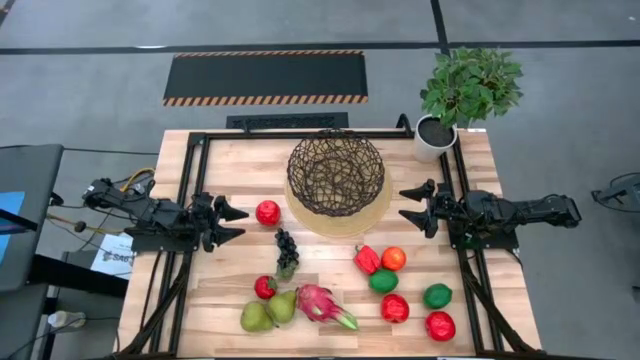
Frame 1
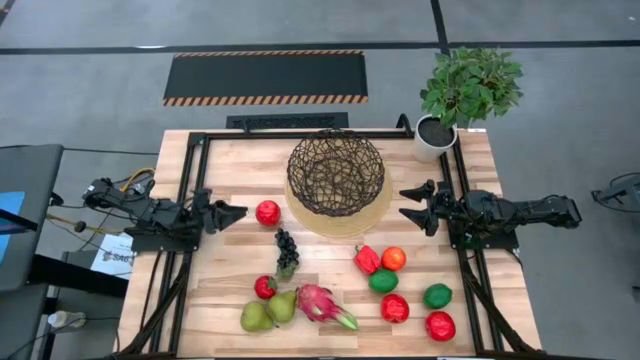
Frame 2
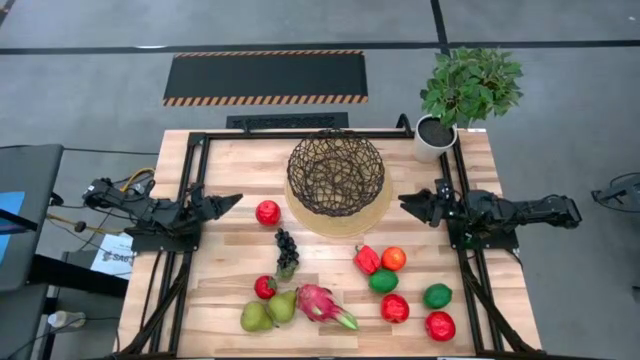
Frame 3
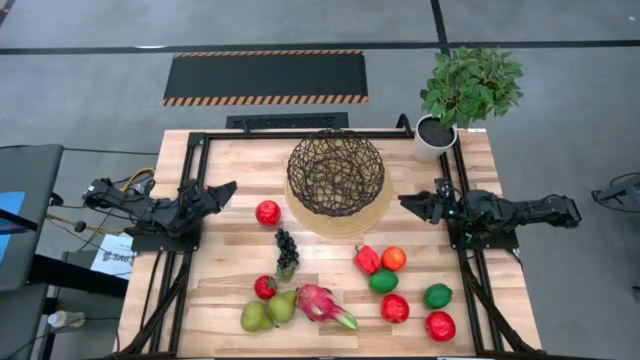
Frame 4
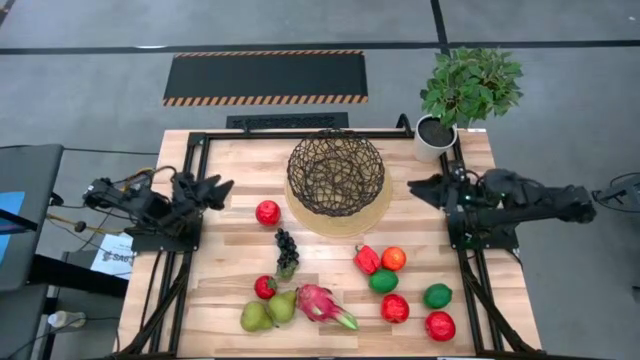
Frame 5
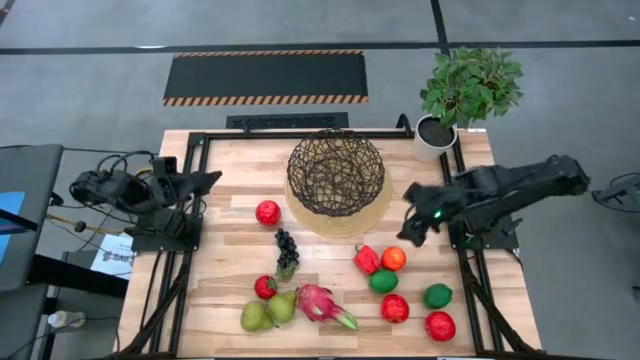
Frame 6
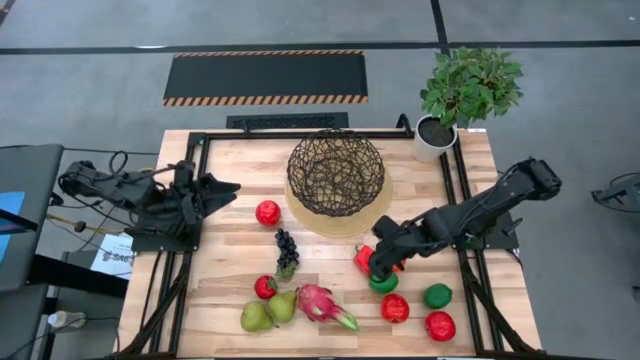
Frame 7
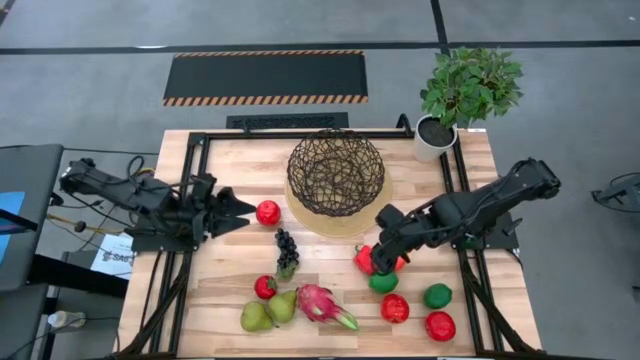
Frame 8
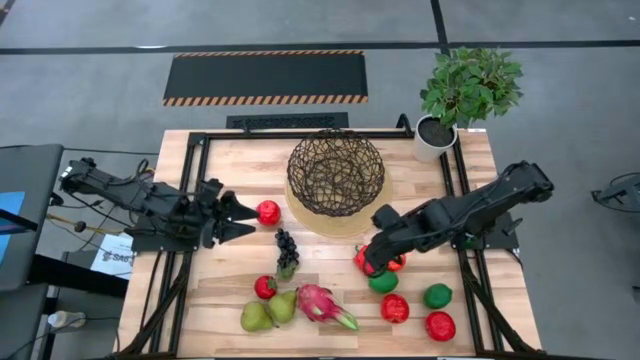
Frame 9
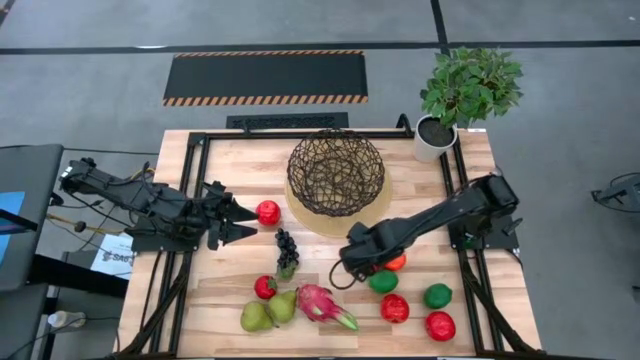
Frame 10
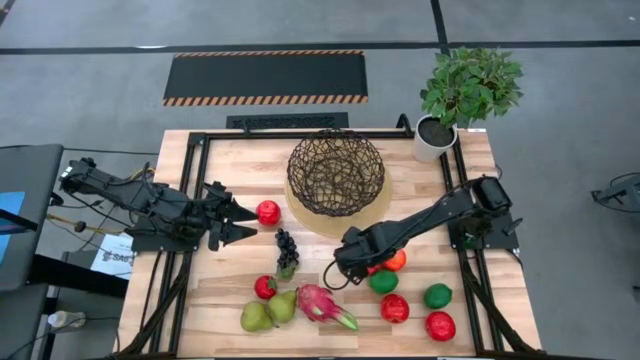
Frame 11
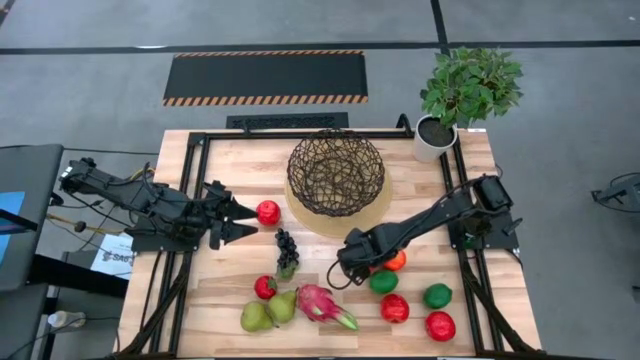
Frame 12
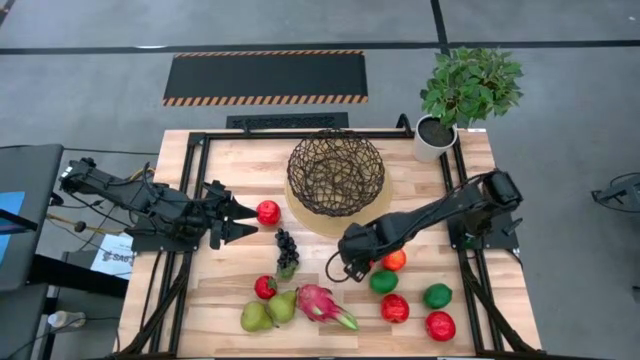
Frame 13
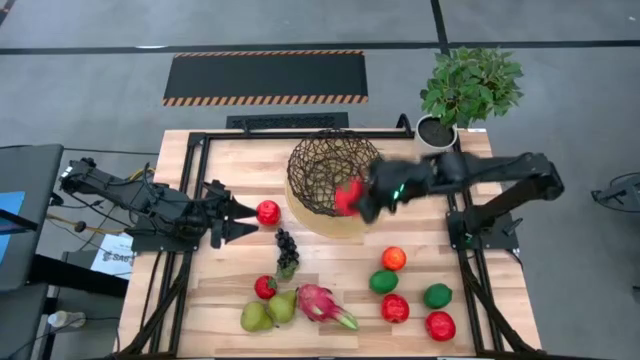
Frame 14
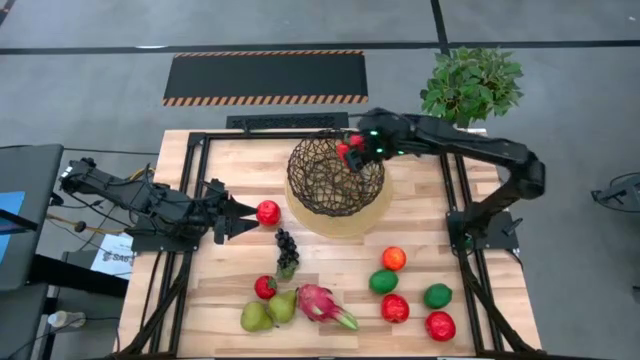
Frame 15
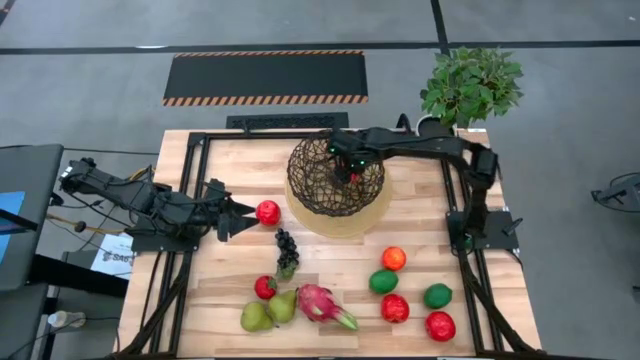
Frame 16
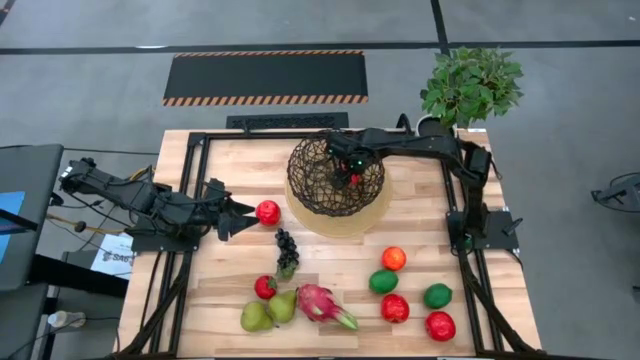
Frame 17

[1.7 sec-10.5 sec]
Task: Build produce basket
Put the red bell pepper into the black wire basket

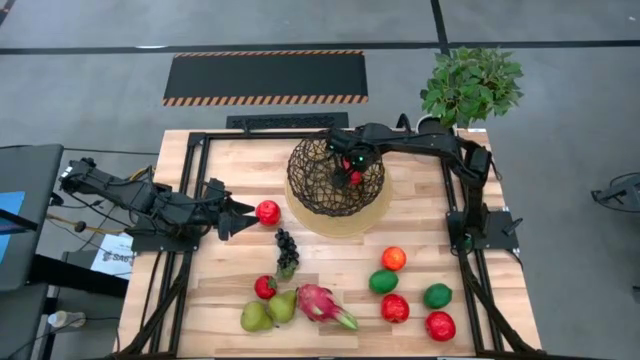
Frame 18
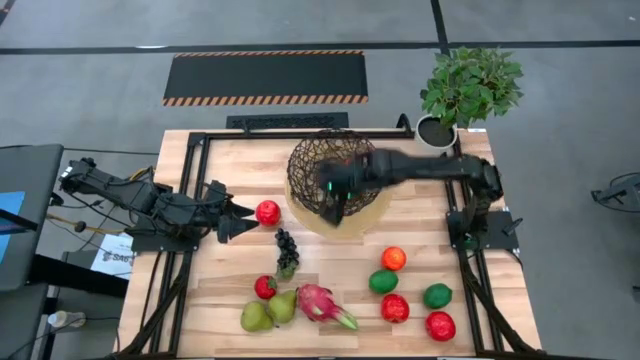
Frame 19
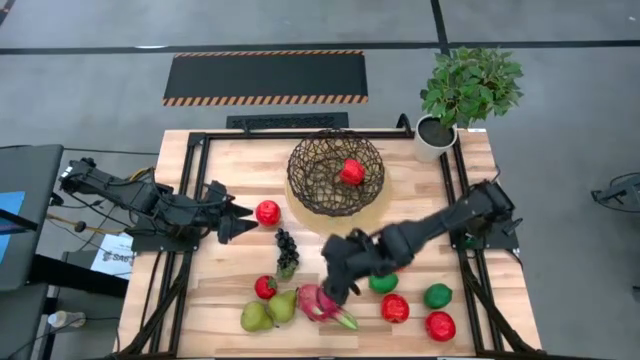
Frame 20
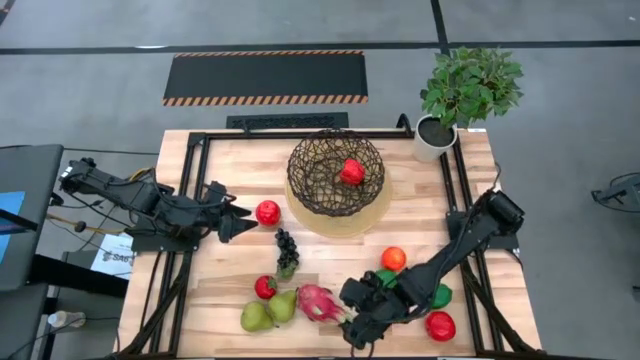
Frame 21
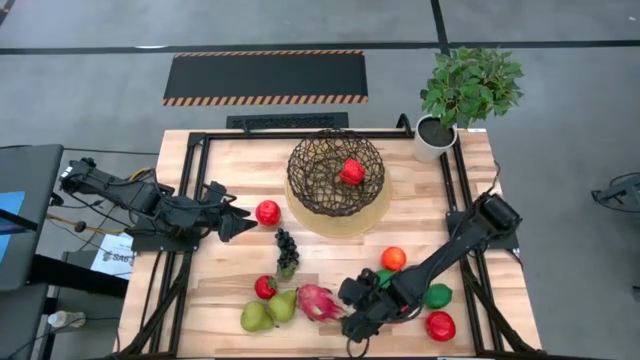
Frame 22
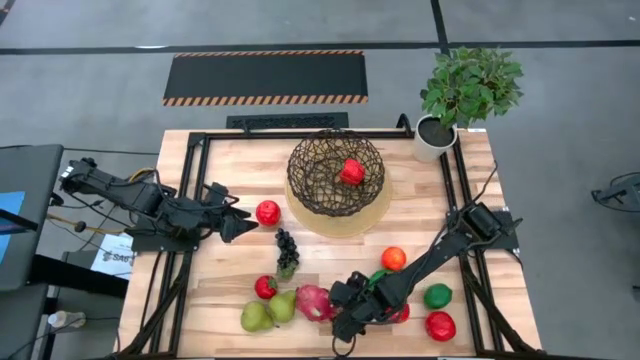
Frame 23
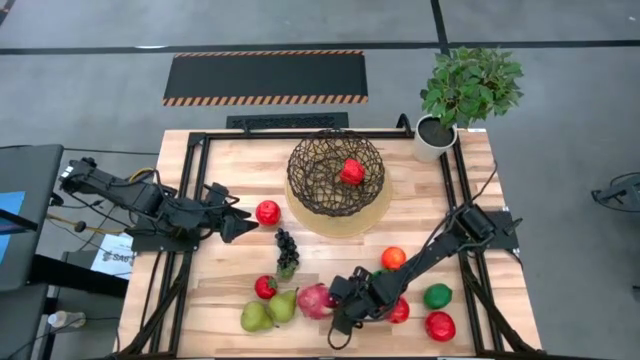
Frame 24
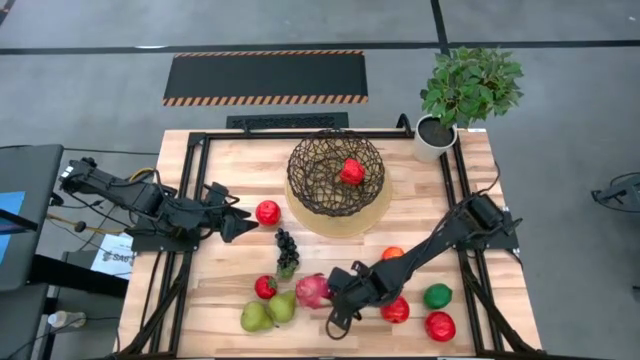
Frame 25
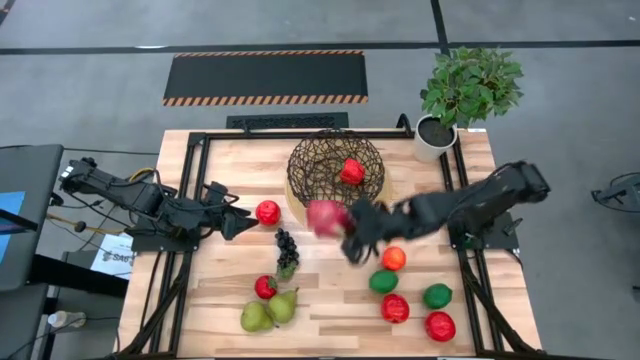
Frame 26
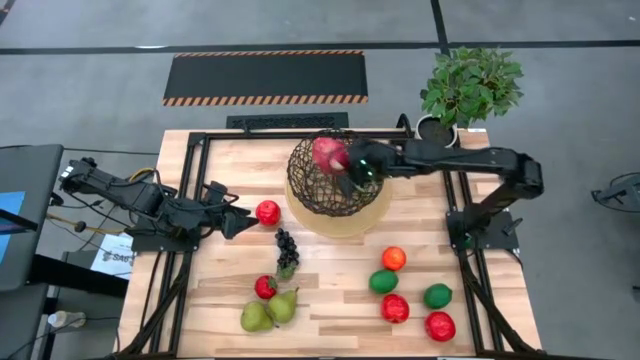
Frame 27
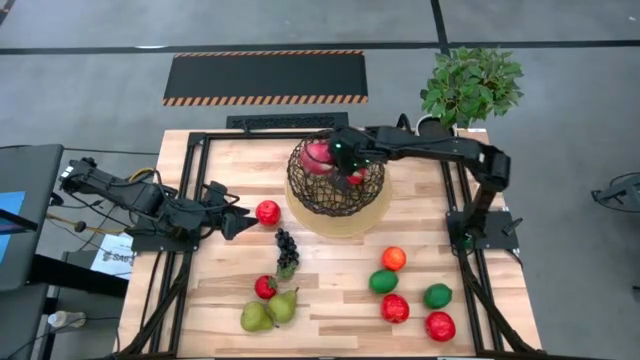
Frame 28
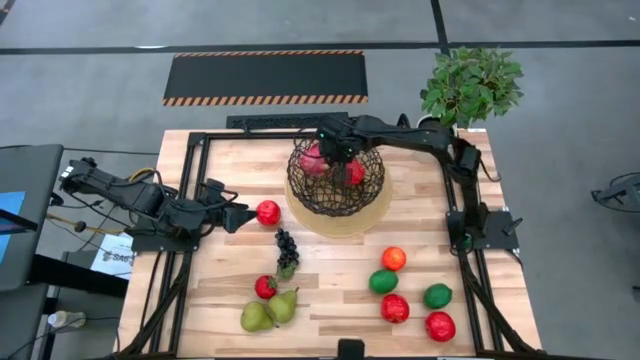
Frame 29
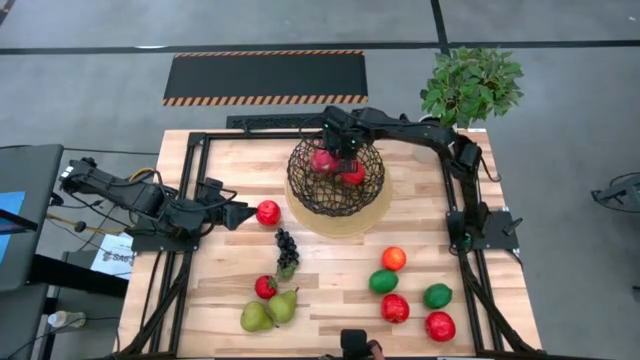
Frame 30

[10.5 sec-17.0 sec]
Put the pink dragon fruit into the black wire basket

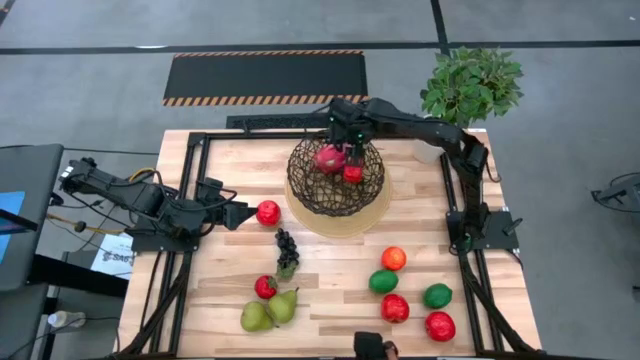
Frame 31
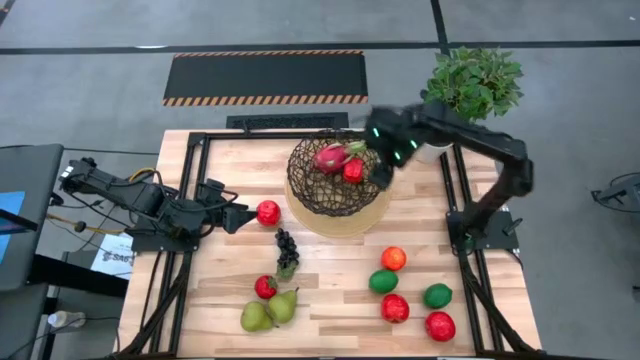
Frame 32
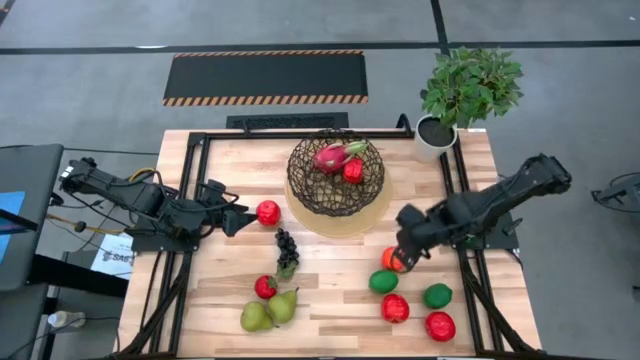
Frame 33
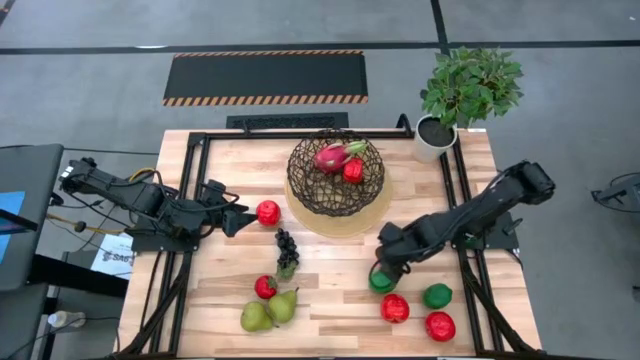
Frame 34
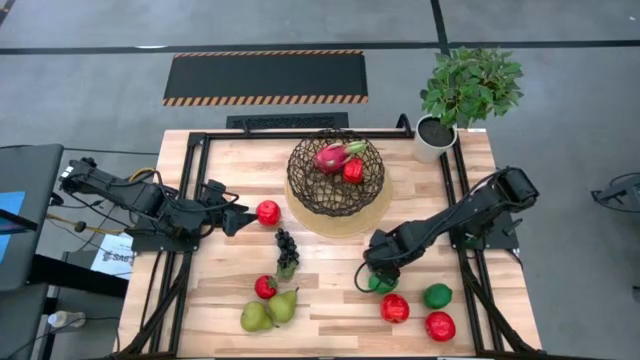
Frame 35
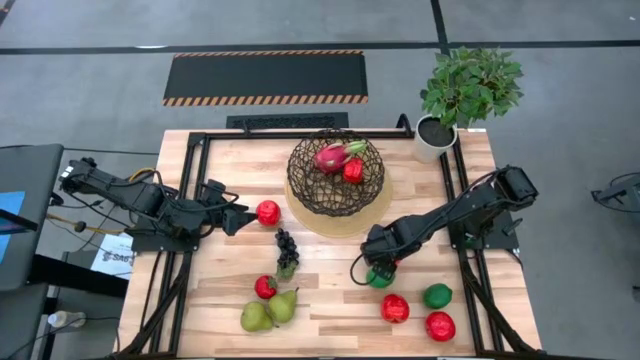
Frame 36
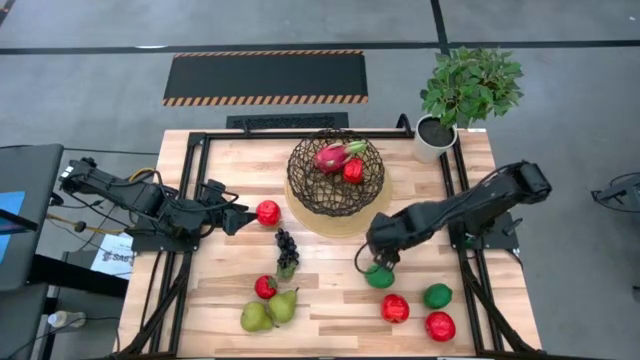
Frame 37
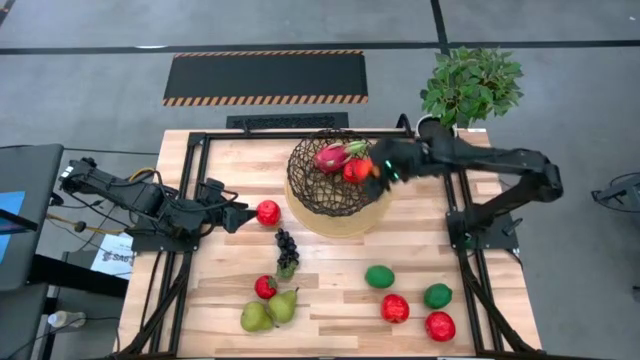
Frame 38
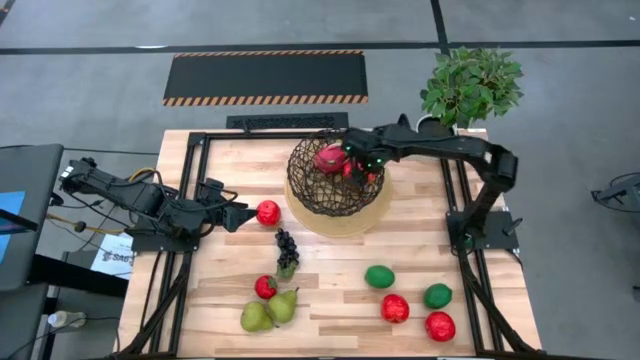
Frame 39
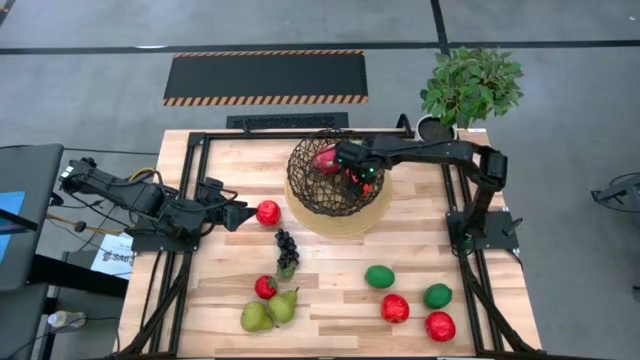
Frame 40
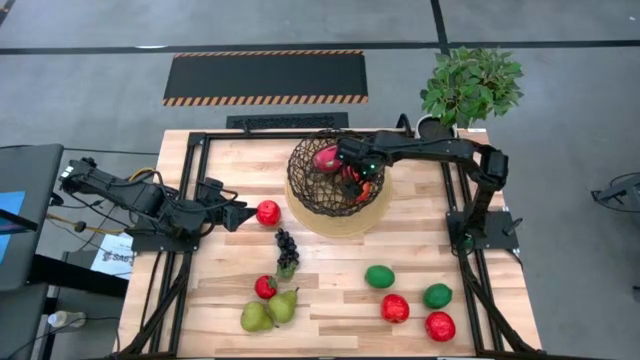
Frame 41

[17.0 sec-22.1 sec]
Put the red apple into the black wire basket

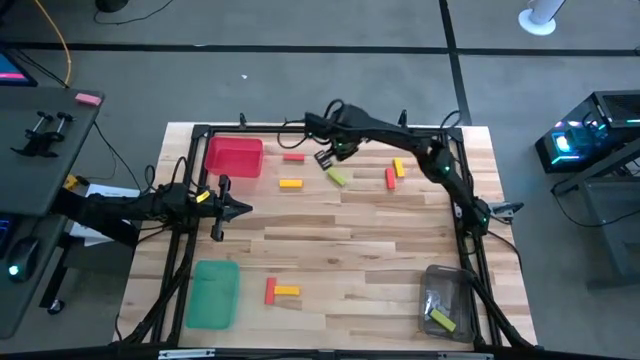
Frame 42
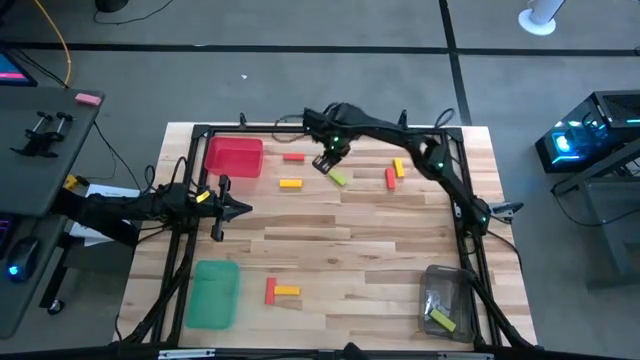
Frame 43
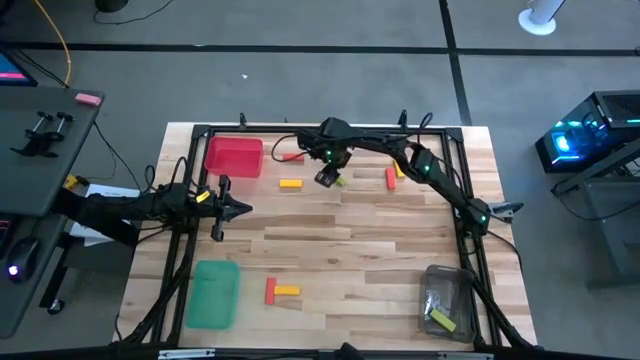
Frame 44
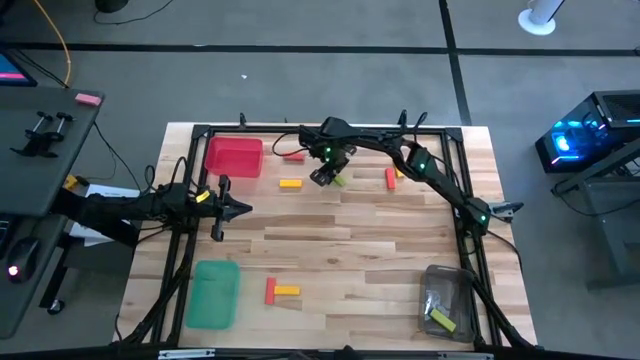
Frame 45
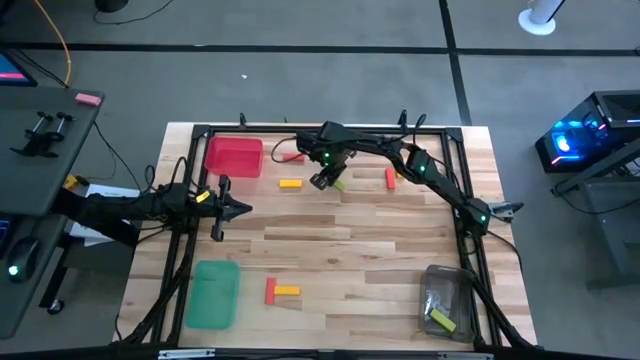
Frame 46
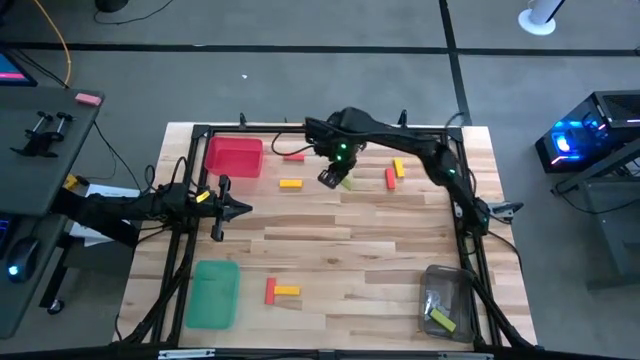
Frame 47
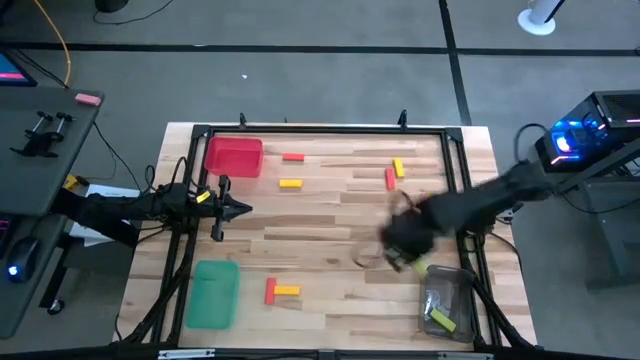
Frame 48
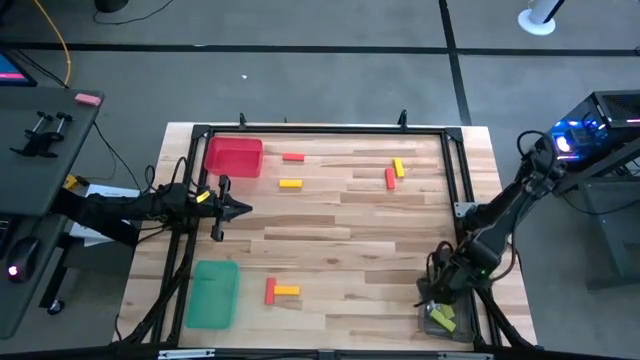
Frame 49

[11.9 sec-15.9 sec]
Task: Sort blocks
Put the green block into the black bin
